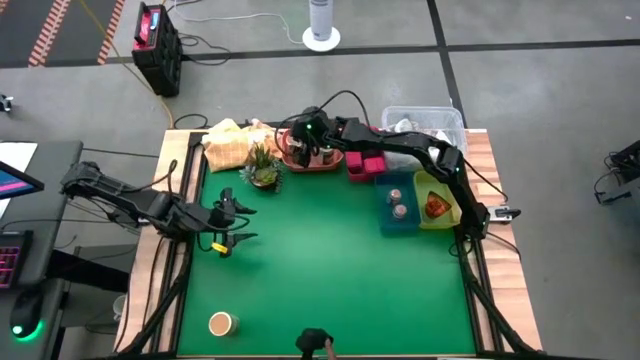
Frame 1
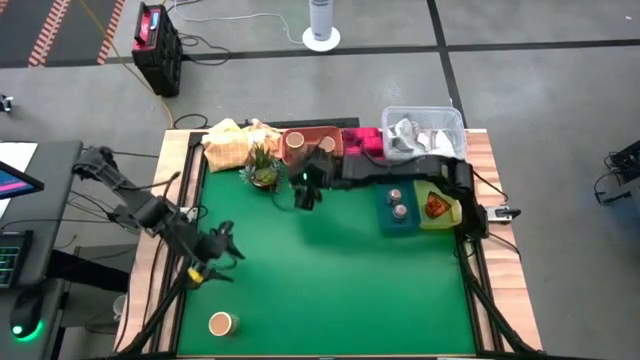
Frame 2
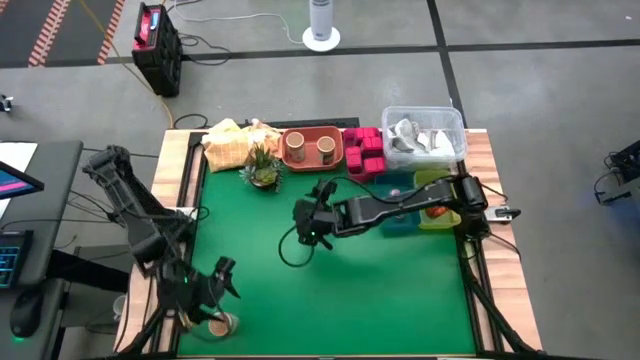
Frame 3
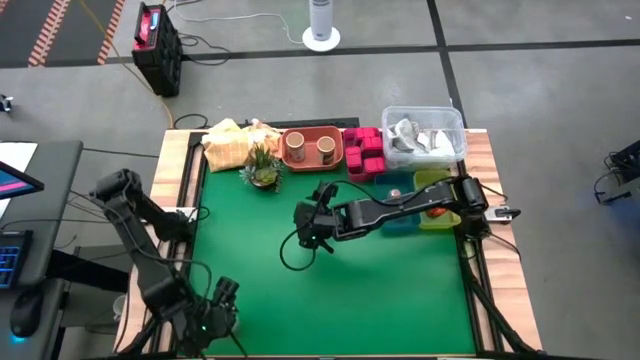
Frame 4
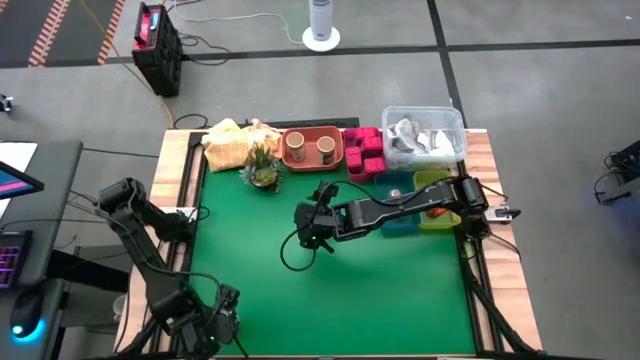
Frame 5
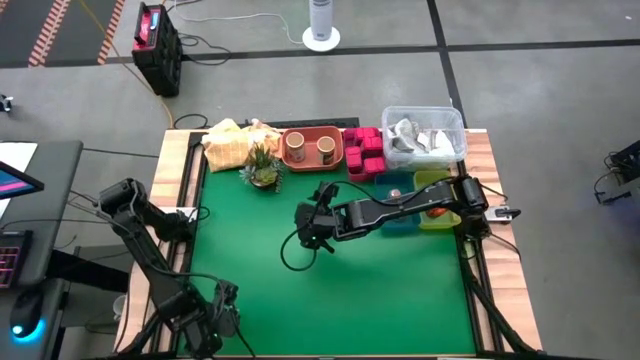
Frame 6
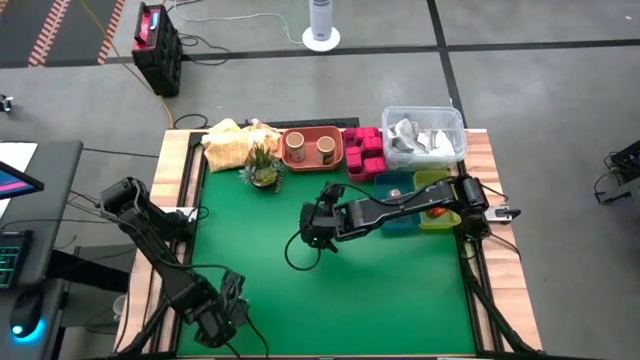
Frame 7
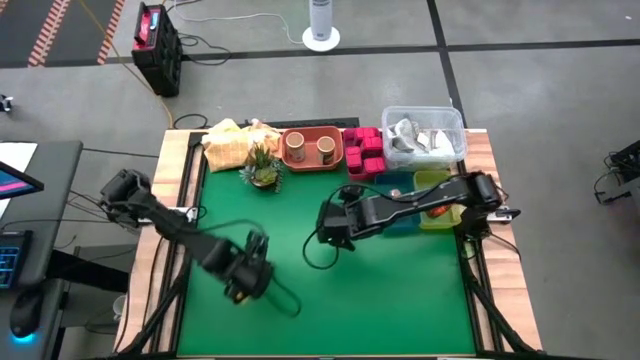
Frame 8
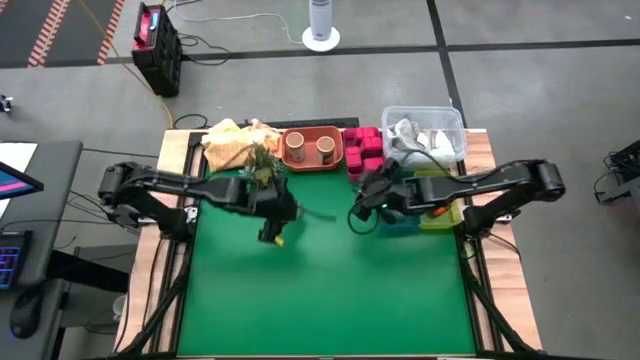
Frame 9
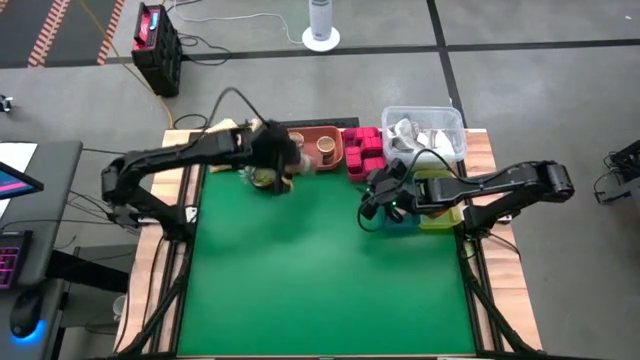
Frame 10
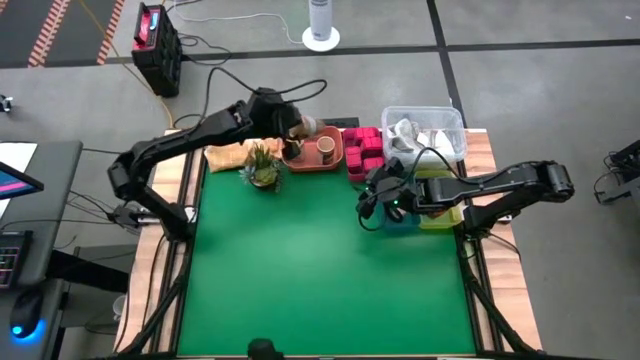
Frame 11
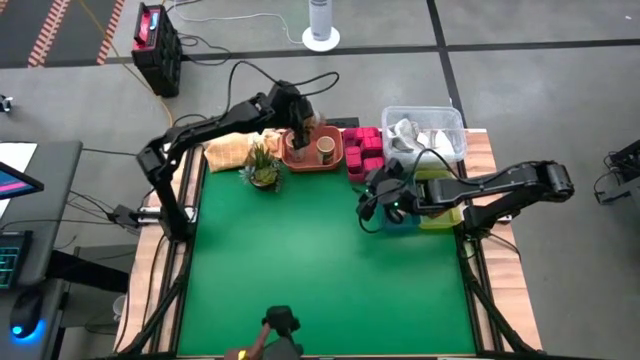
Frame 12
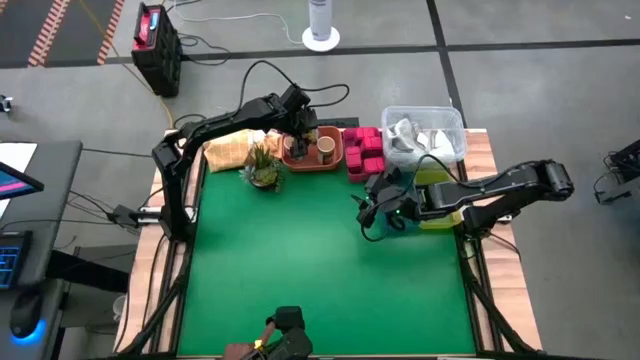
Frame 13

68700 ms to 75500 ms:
Task: Sort spices by type
Put the gold seasoning bottle into the orange bin

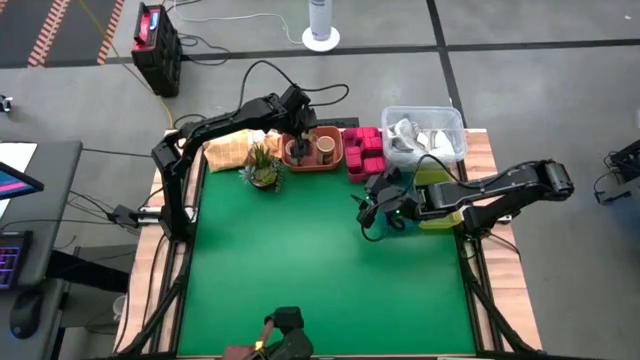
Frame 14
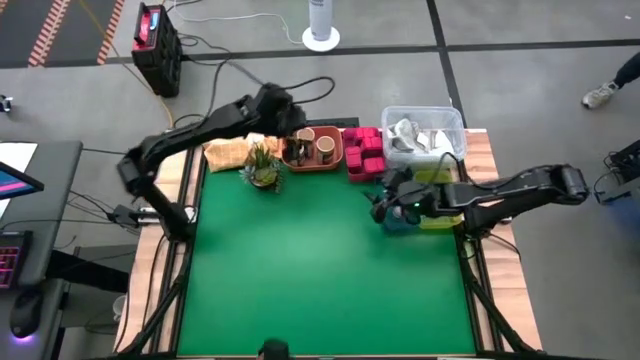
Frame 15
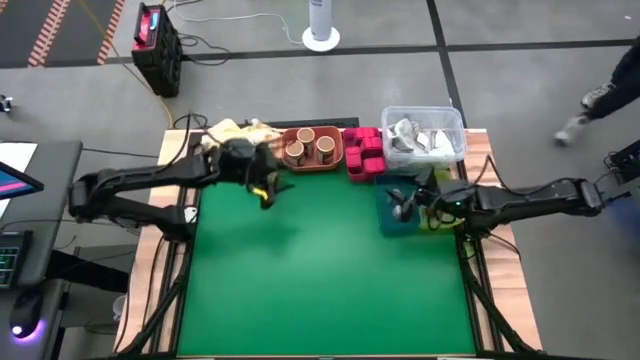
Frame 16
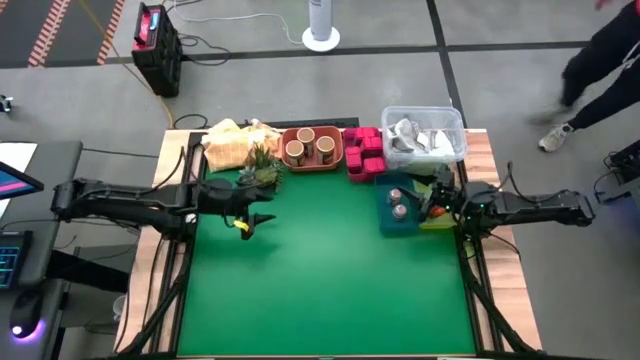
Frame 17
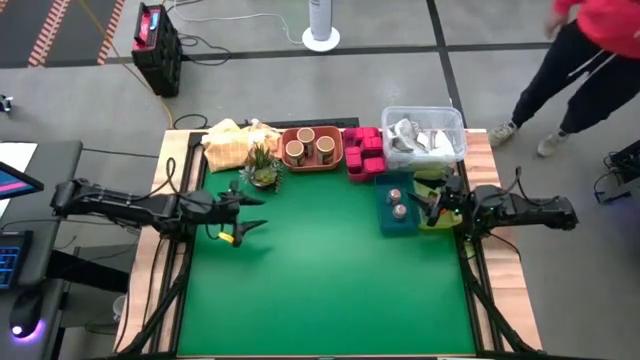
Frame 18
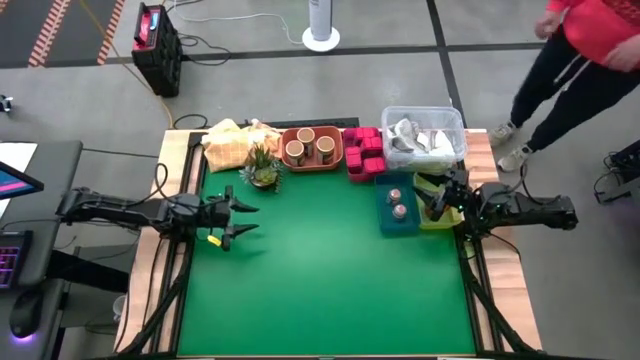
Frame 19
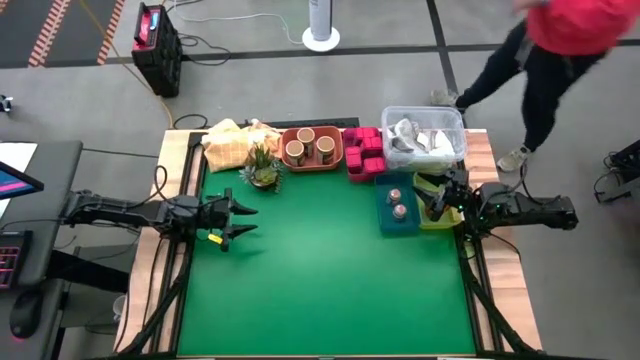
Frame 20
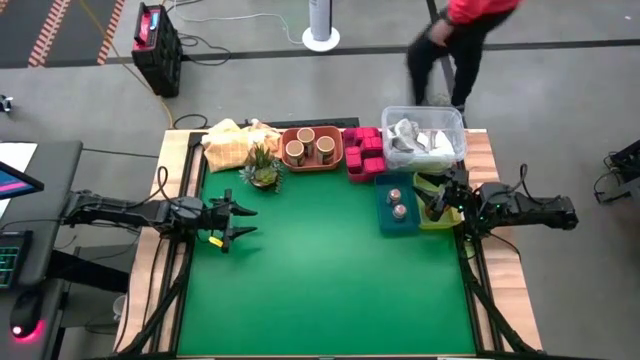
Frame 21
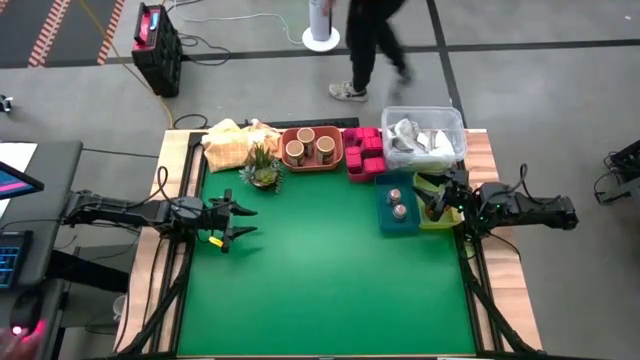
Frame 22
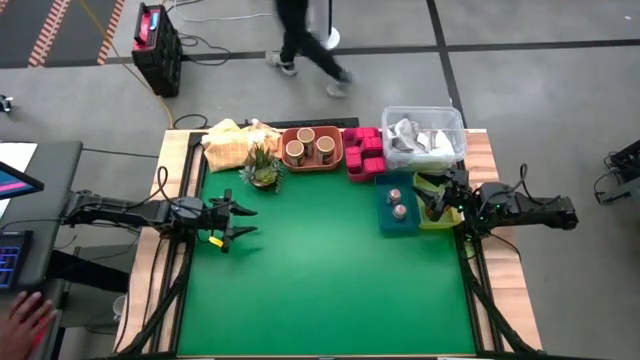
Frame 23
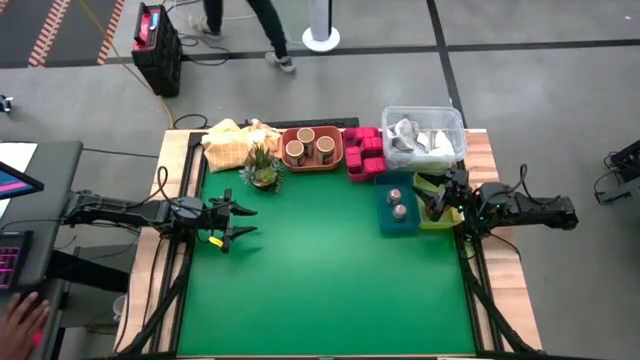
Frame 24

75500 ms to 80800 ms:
Return to Home Position

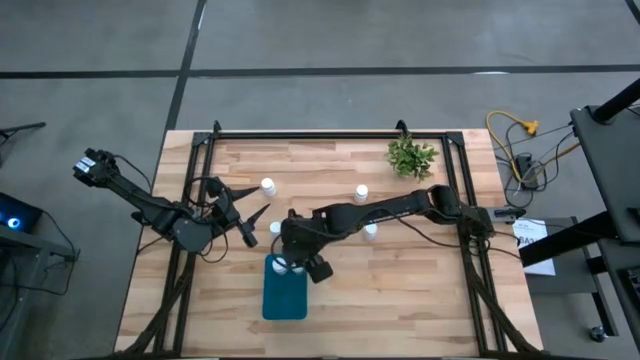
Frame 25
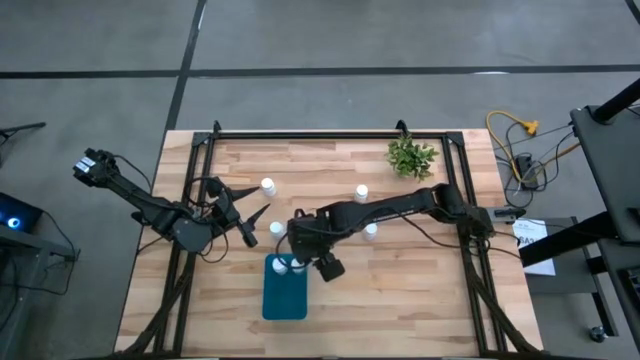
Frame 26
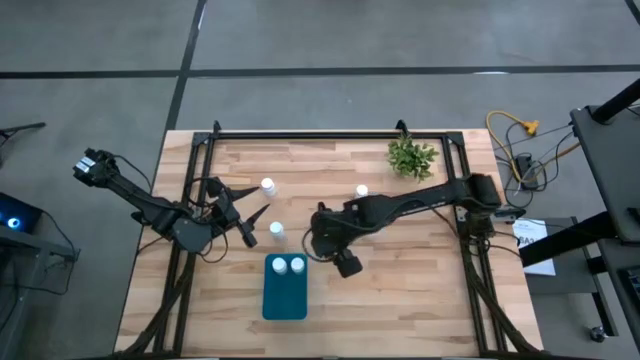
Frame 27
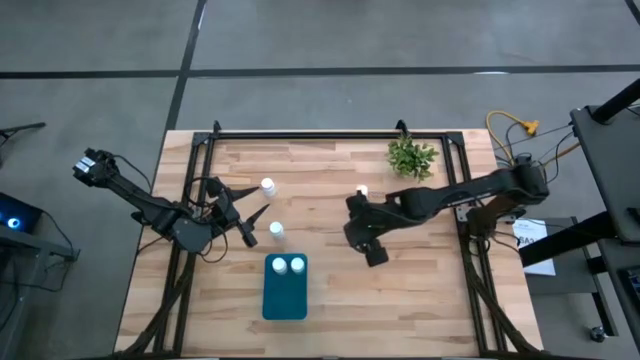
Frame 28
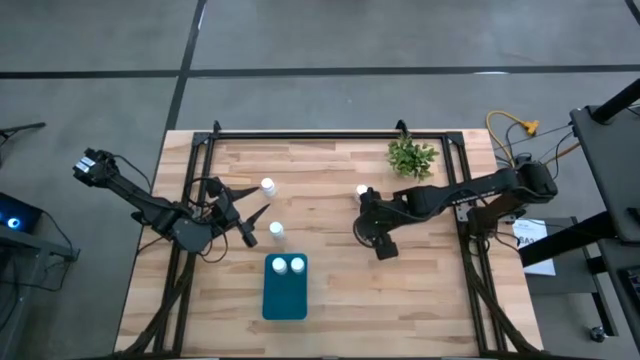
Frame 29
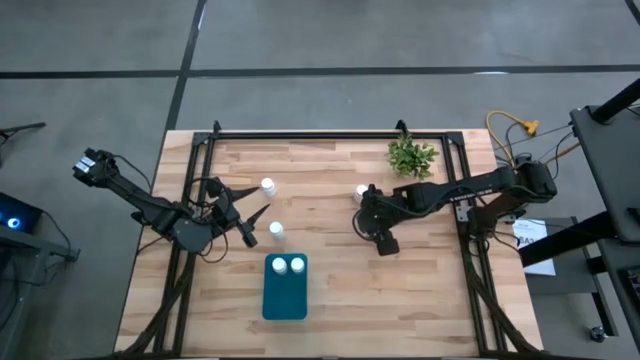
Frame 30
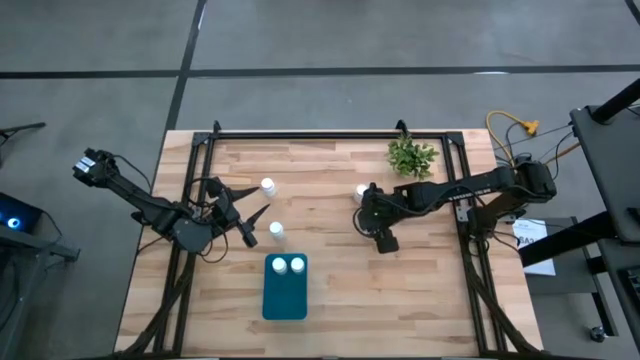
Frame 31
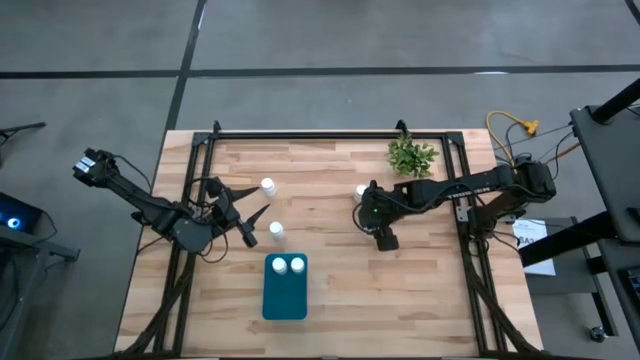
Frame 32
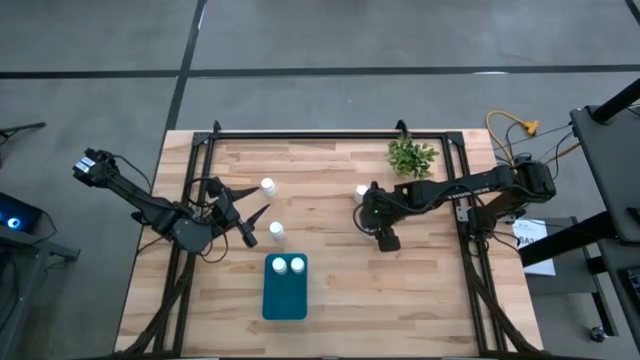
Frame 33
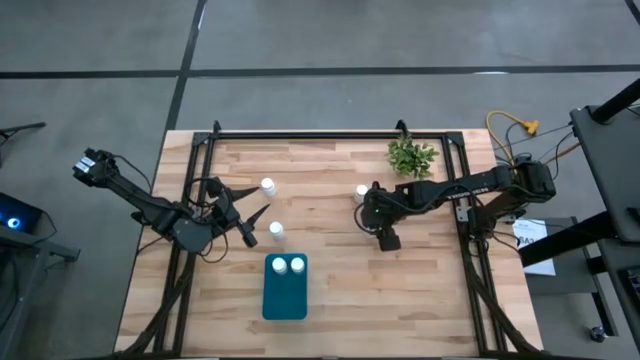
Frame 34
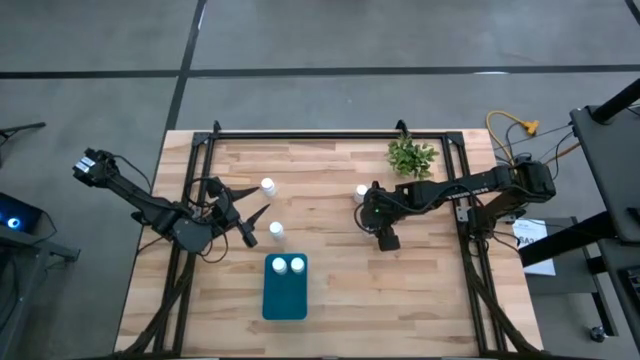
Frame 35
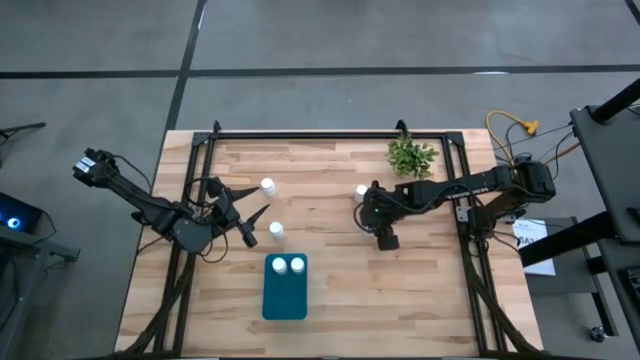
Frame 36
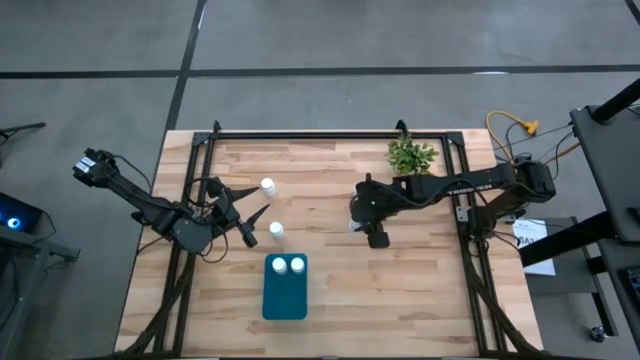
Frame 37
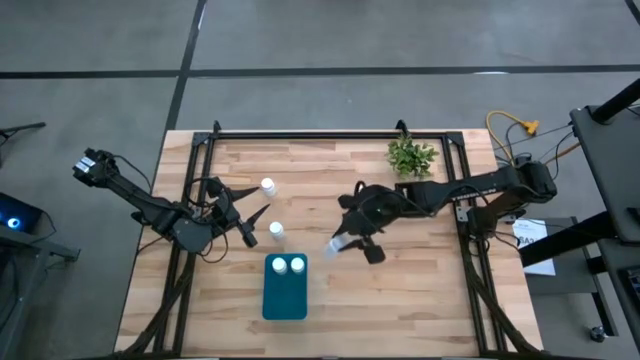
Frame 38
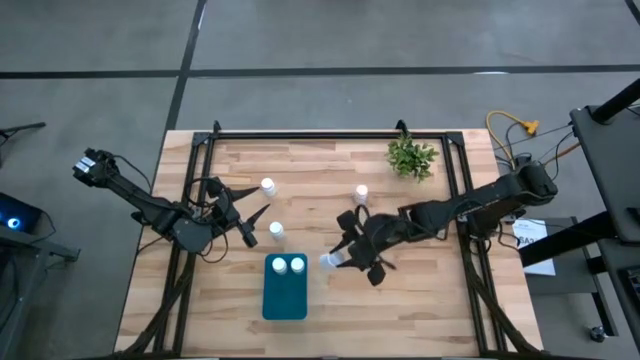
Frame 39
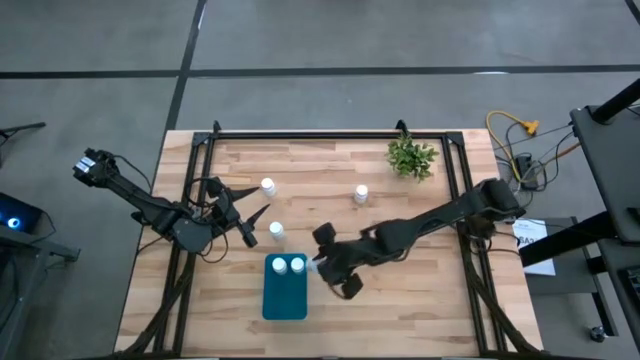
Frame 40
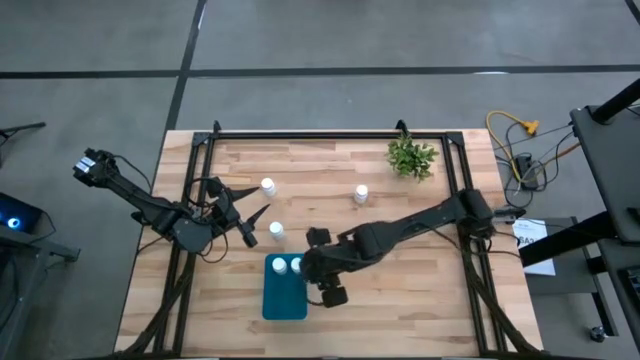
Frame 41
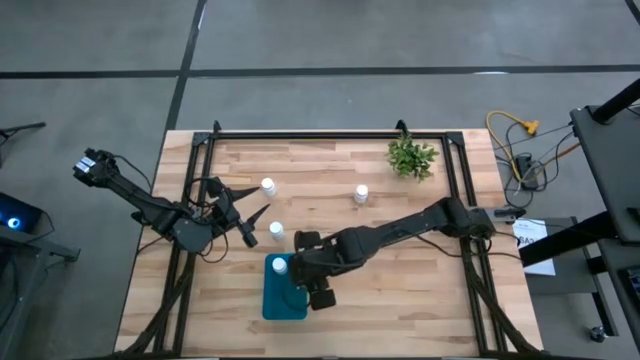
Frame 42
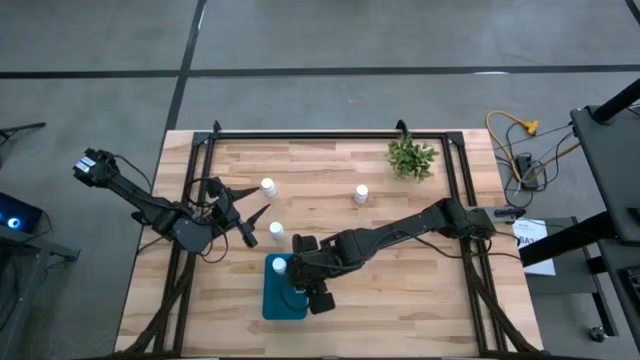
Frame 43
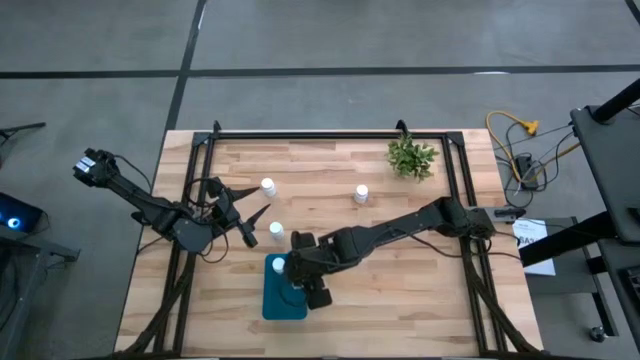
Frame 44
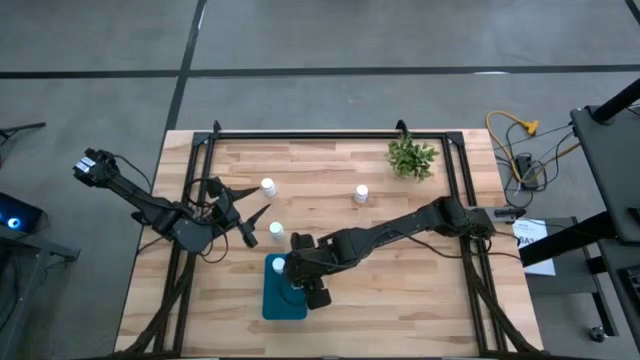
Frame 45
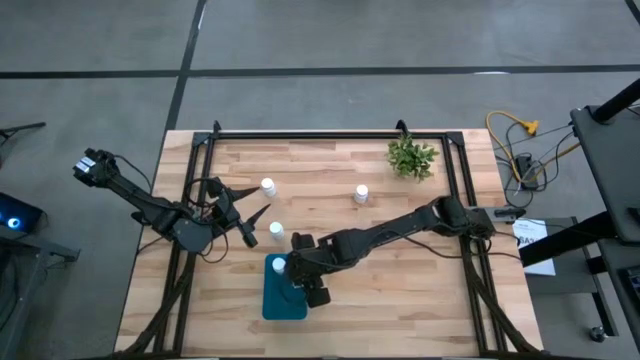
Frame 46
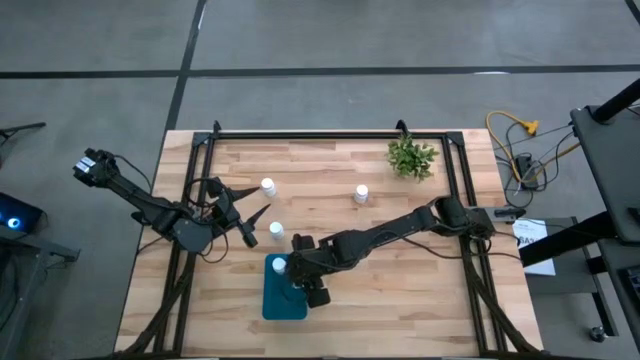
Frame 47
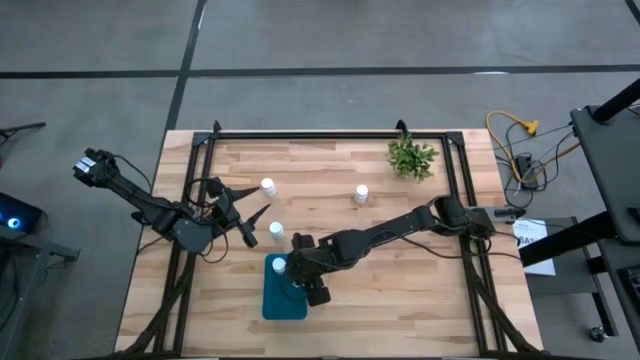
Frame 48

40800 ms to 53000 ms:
Task: Pick and place pill bottles into a basket
Put the white pill bottle into the blue bin
